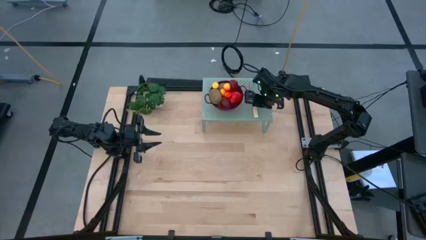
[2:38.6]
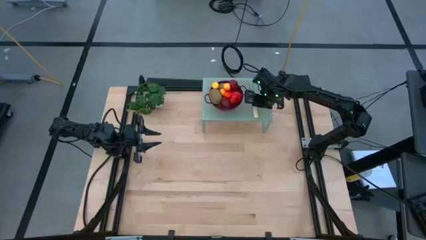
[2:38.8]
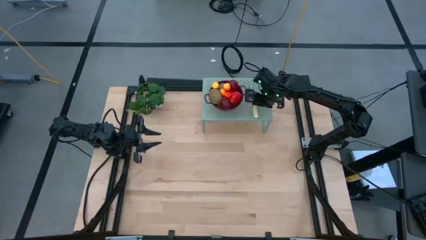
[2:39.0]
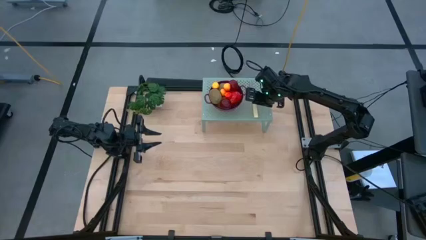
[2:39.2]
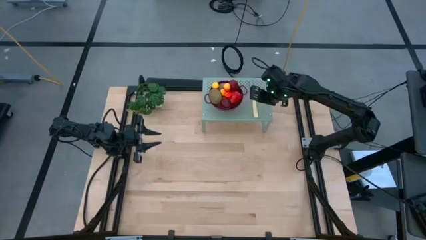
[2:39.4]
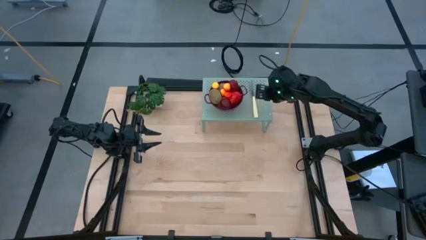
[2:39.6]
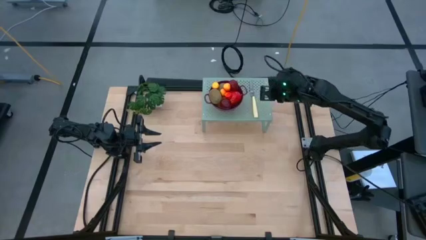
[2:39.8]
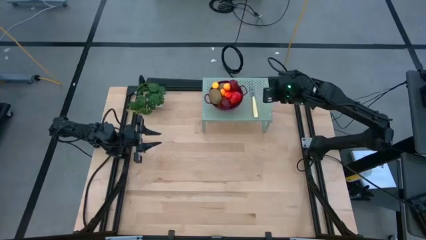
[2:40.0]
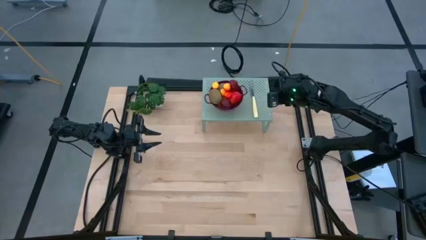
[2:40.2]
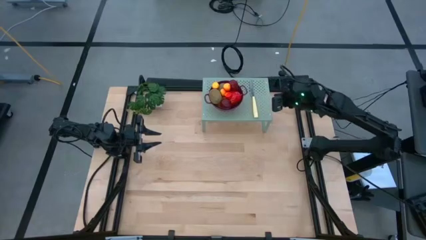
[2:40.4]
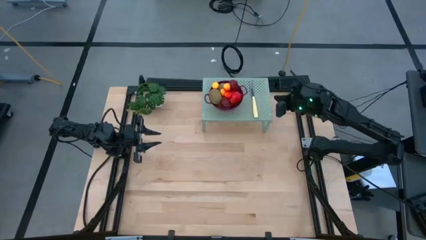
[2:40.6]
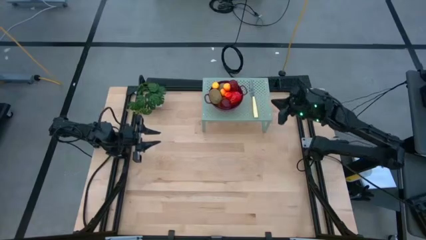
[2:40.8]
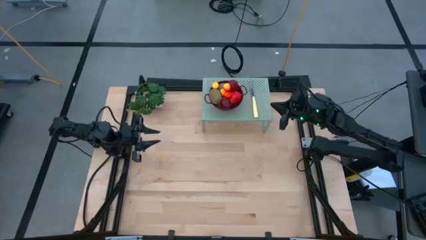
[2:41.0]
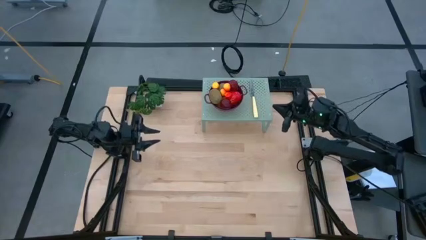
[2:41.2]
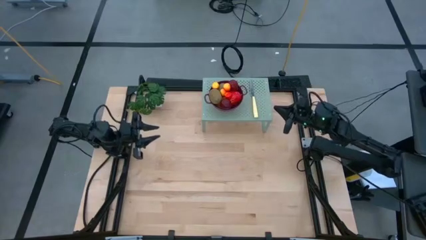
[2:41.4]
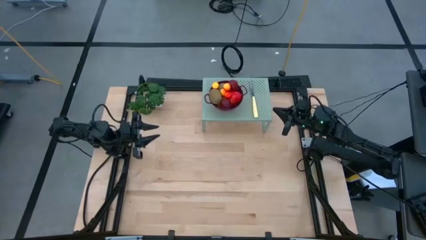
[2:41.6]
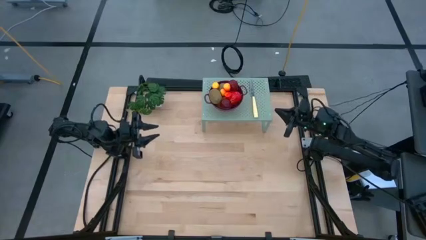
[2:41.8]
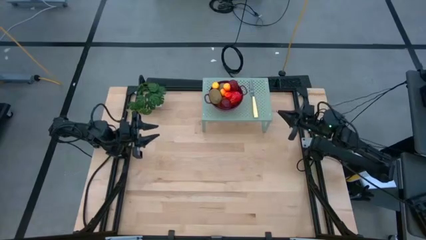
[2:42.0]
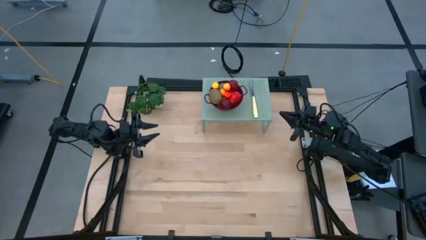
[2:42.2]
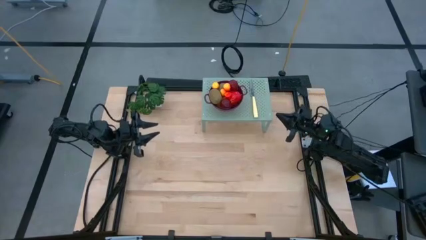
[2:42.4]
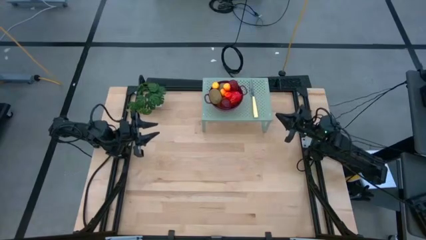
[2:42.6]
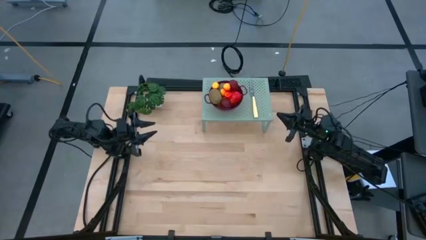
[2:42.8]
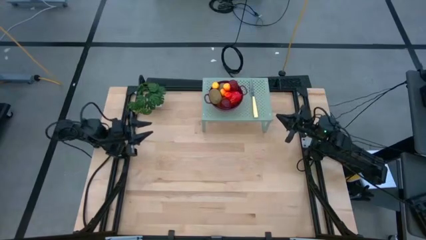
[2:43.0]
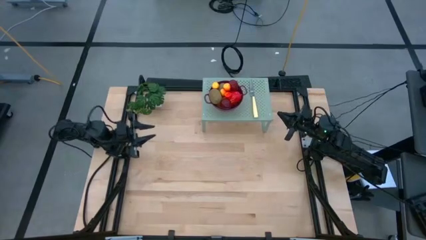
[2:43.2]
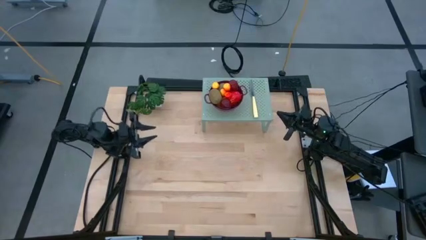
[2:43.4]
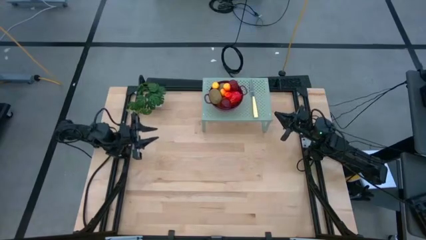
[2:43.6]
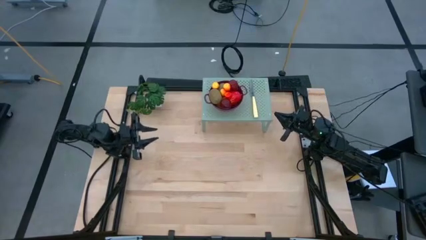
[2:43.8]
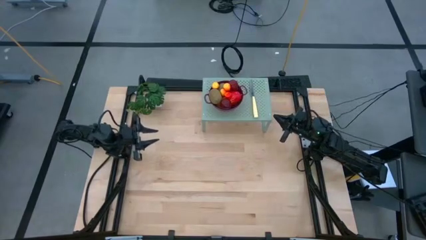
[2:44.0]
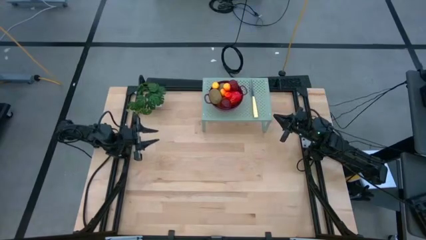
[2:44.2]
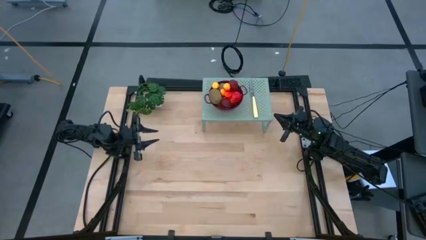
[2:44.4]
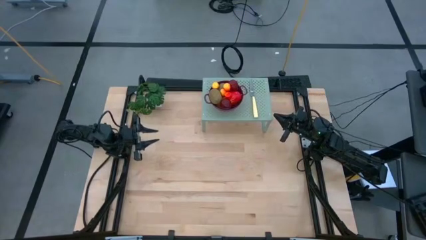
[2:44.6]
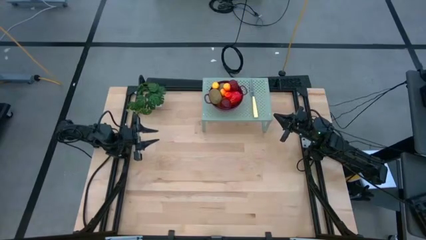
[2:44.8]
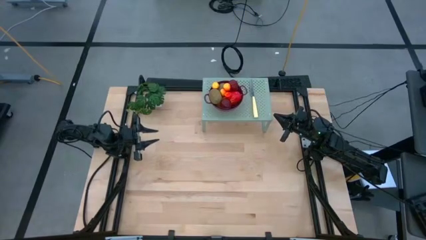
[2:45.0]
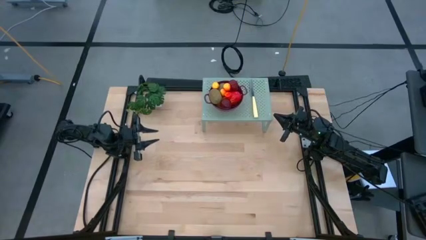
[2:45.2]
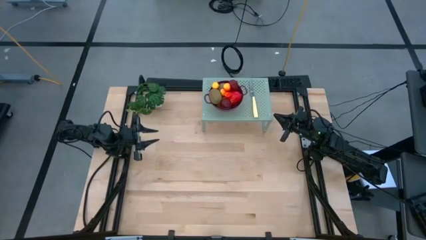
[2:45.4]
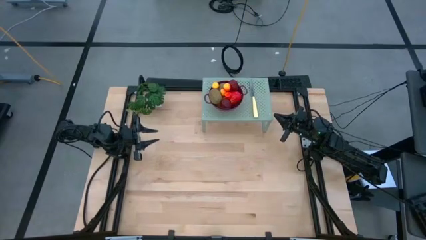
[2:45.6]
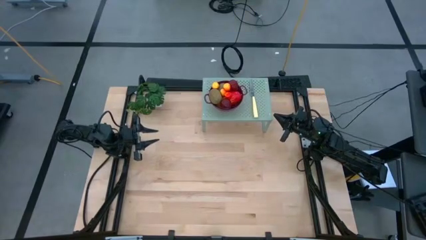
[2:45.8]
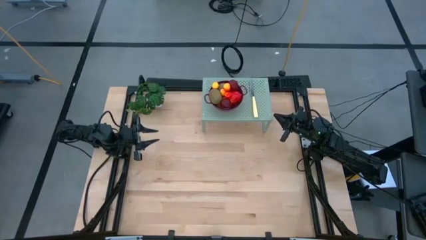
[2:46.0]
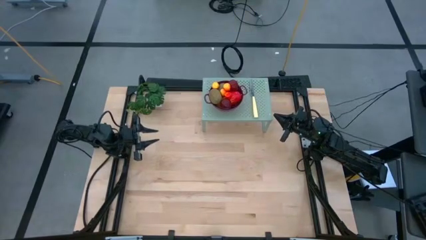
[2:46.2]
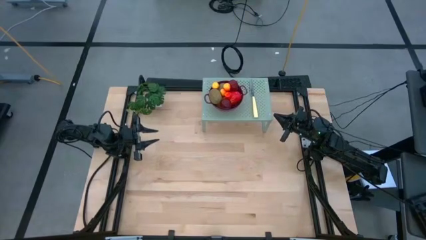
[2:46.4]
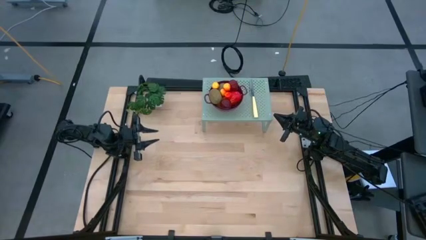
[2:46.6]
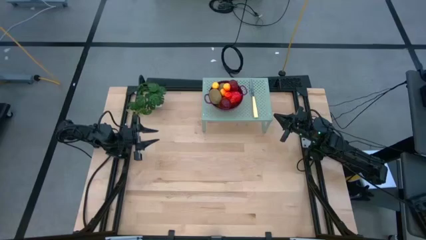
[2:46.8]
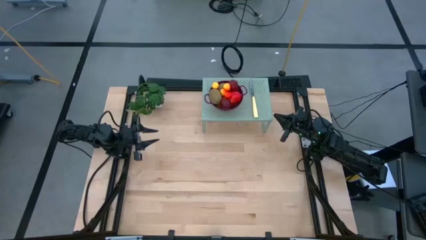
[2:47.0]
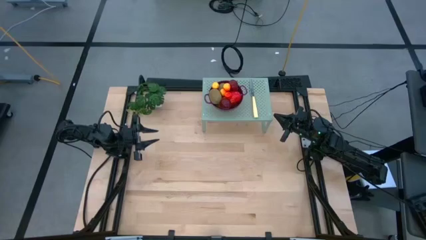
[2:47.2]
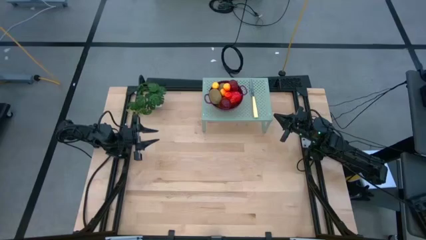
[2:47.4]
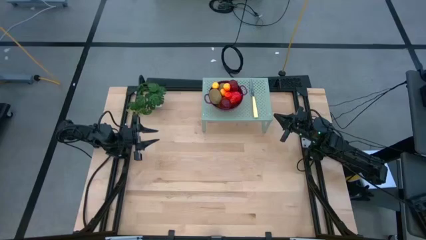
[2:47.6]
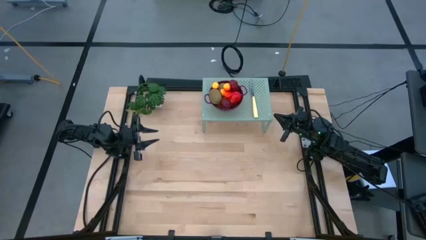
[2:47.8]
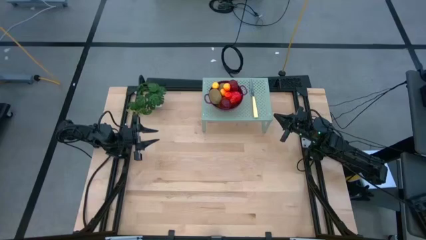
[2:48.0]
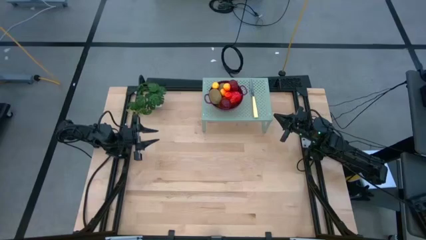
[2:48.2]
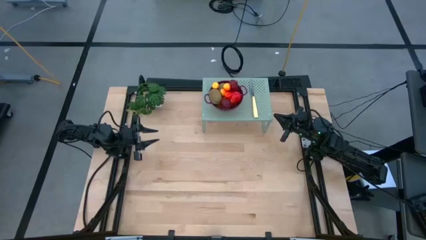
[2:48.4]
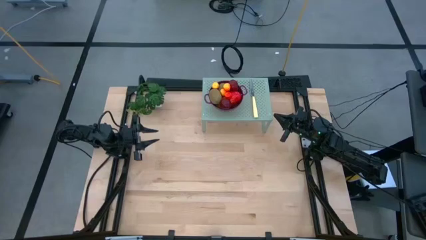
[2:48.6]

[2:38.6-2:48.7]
Task: Pick & Place Fruit
Return to Home Position

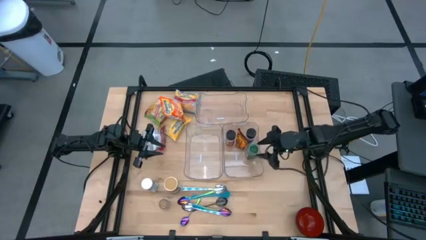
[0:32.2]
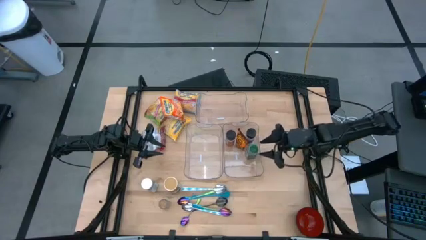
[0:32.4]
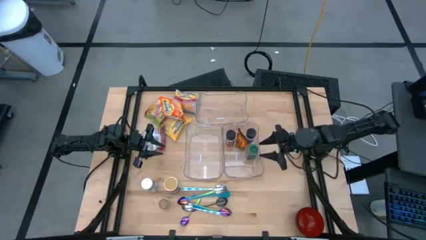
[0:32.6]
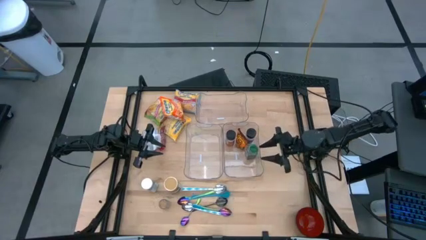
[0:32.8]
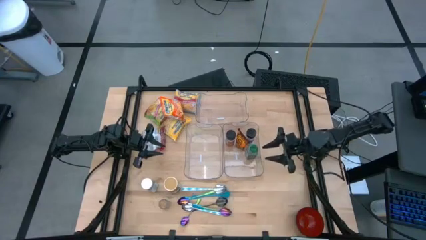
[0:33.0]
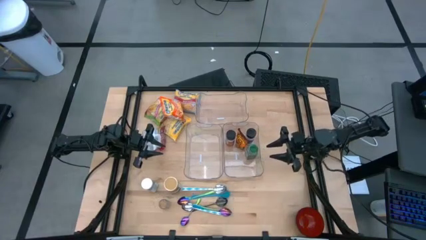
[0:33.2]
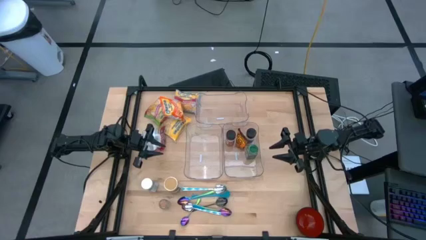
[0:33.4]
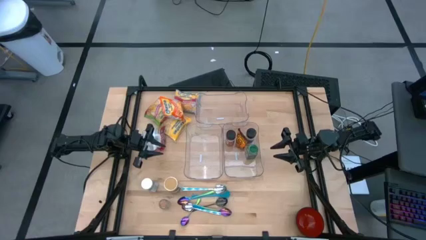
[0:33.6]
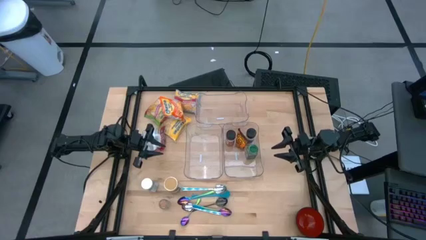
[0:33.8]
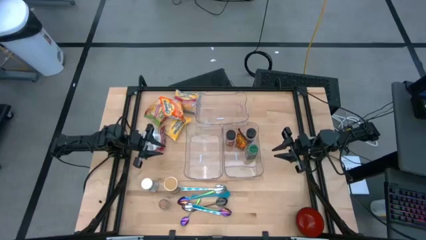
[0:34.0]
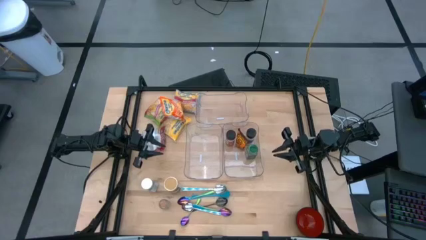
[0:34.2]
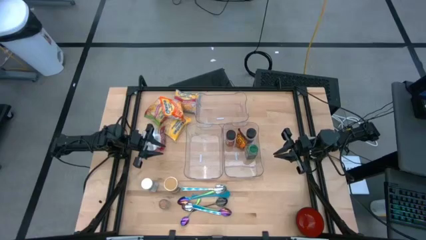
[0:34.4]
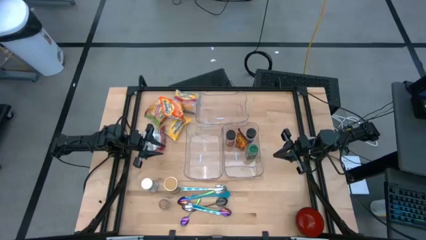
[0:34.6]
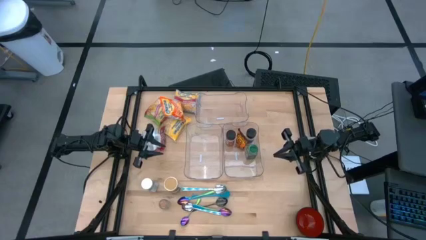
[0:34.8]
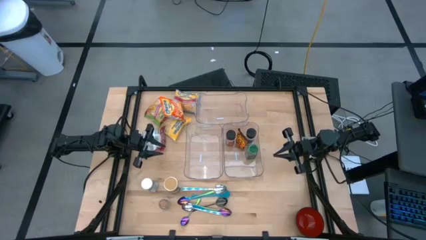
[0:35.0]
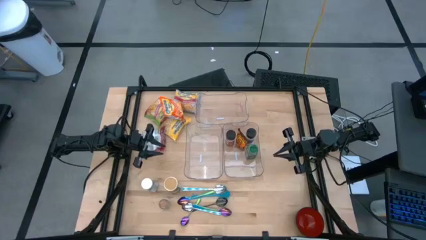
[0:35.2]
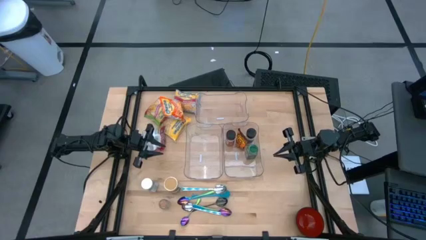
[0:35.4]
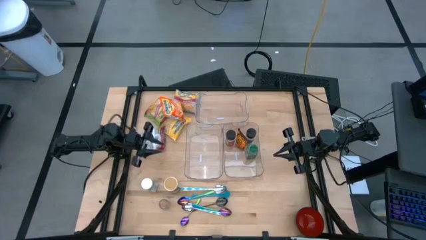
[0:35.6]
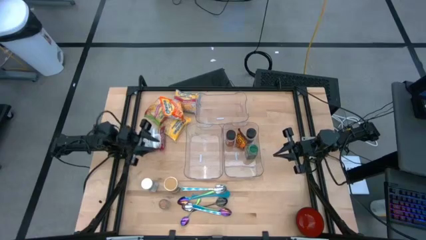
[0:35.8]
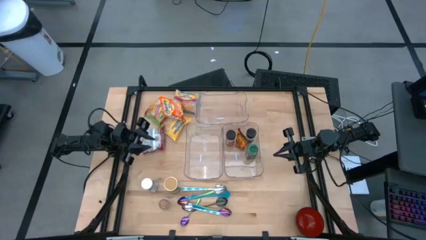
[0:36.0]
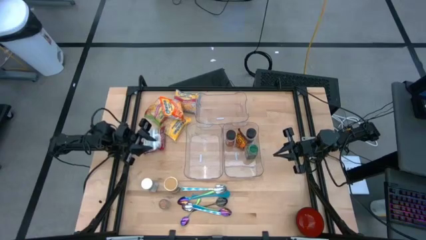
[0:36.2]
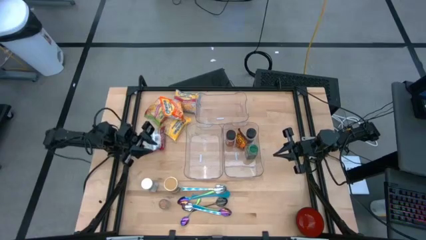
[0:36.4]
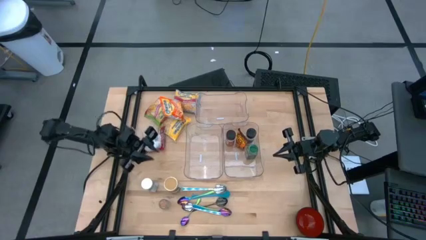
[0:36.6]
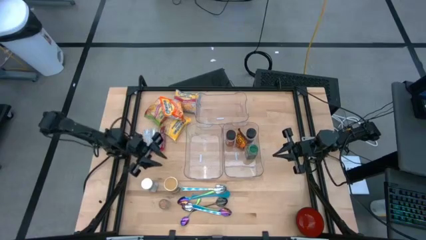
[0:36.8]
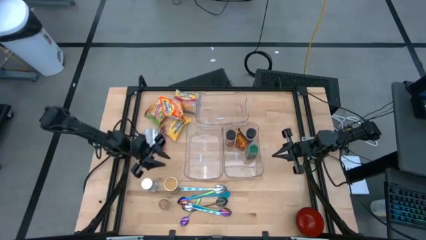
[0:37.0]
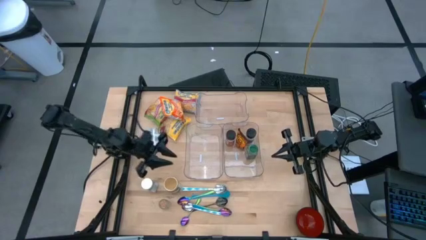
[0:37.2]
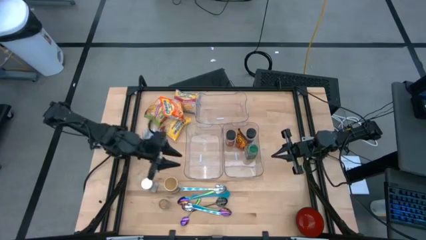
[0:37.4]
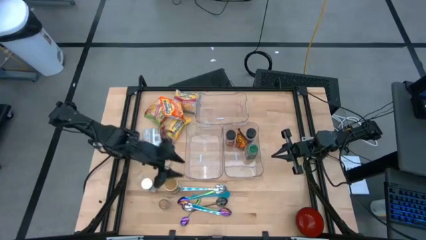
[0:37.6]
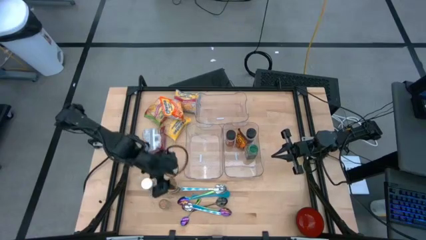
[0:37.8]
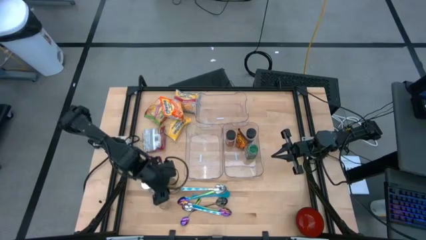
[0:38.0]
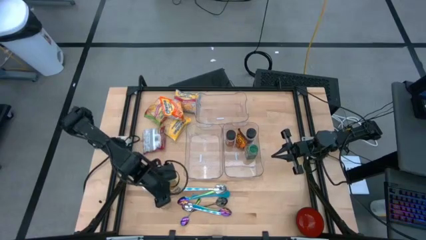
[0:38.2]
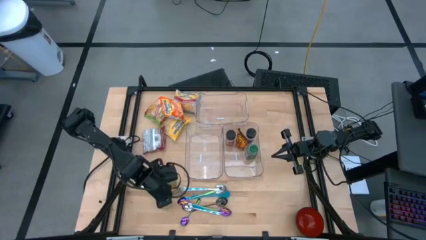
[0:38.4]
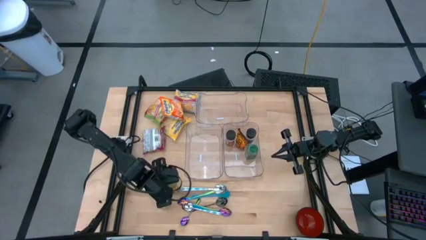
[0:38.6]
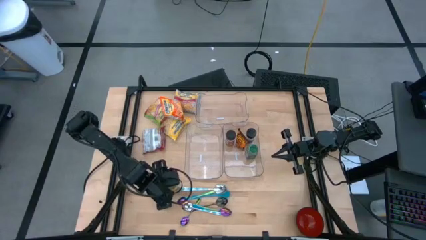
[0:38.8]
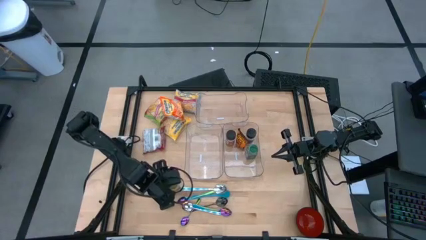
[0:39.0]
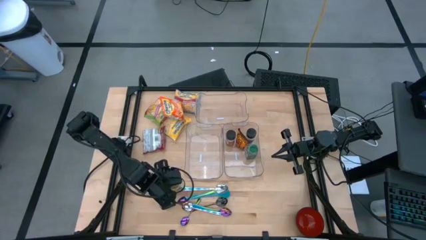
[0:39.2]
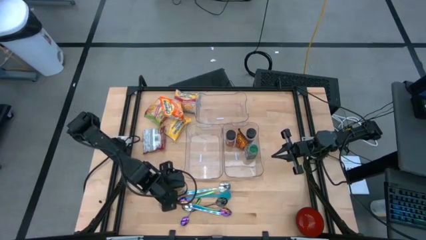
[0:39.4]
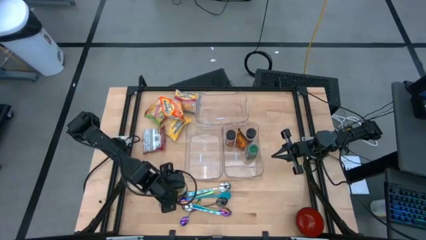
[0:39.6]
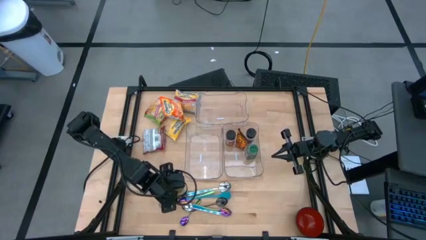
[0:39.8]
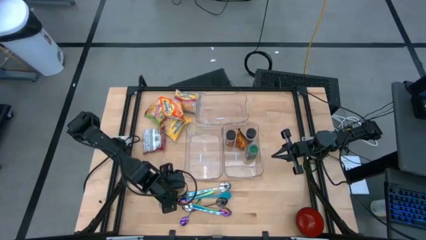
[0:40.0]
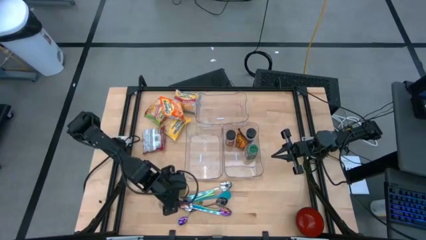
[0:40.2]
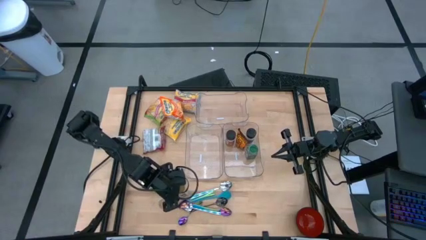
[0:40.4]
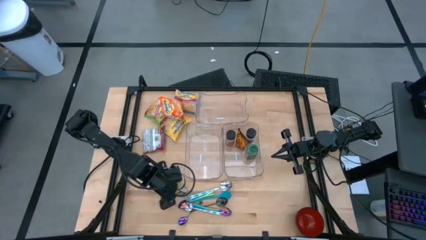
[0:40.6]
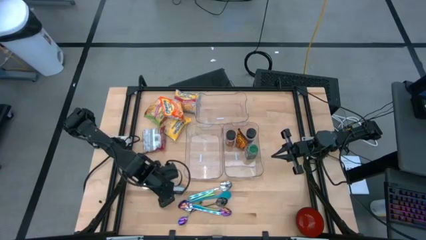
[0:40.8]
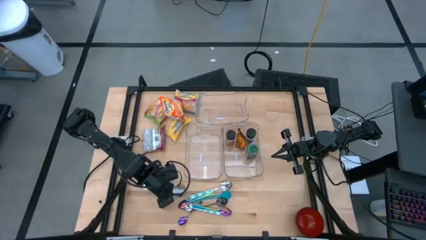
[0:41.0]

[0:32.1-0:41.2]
Task: Pick & Place Food Item
Put the gold seasoning bottle into the bottom right transparent bin
